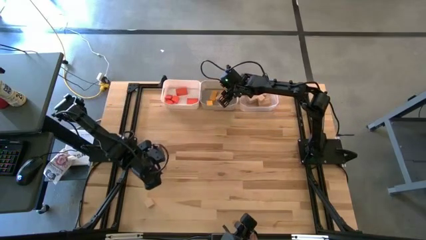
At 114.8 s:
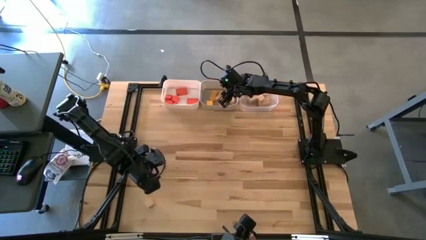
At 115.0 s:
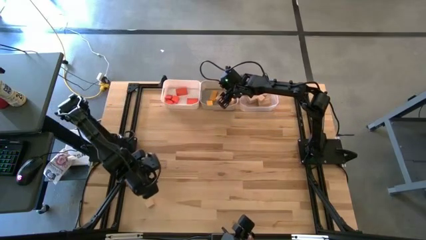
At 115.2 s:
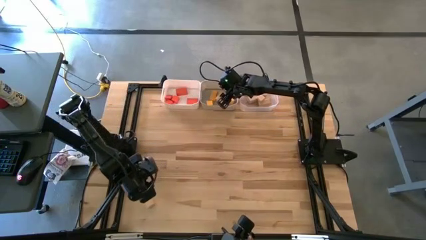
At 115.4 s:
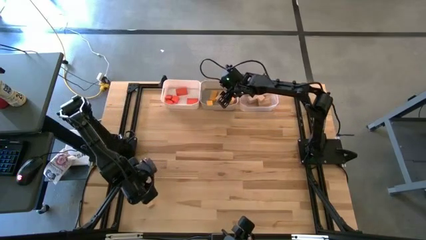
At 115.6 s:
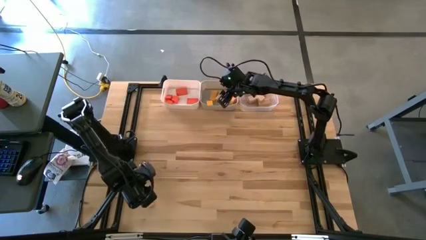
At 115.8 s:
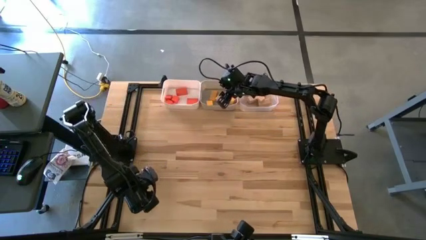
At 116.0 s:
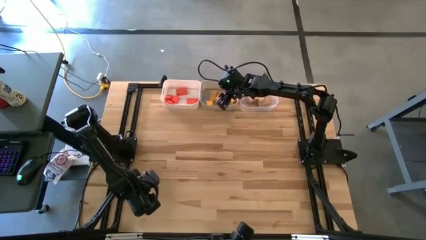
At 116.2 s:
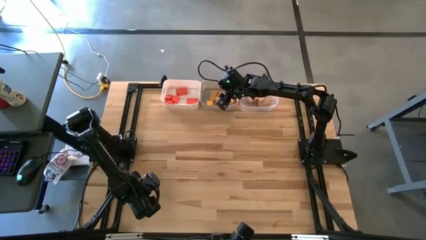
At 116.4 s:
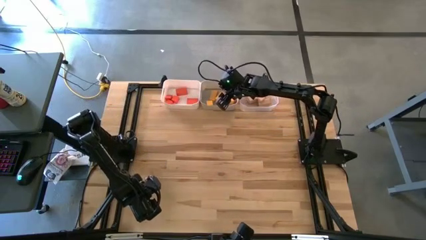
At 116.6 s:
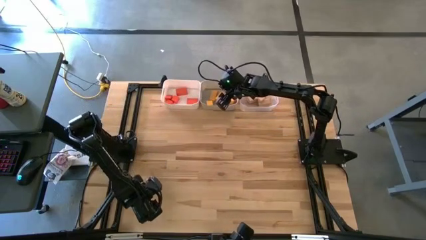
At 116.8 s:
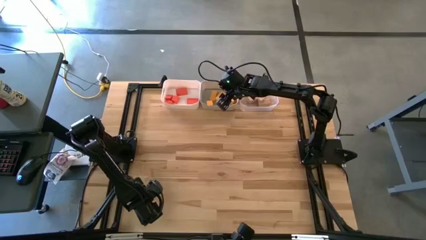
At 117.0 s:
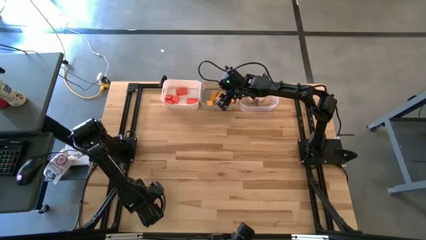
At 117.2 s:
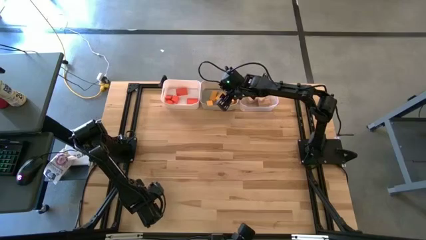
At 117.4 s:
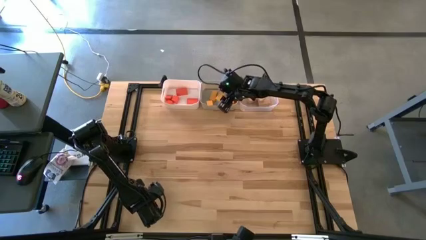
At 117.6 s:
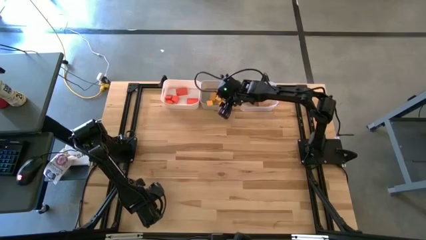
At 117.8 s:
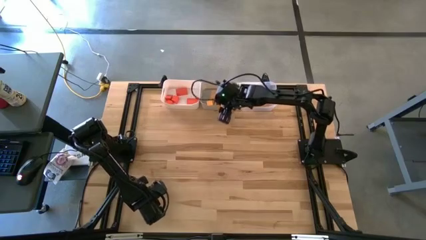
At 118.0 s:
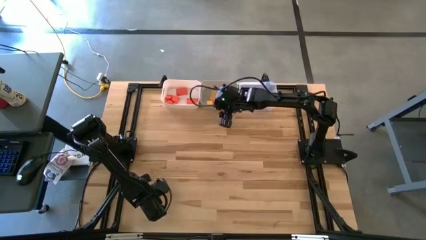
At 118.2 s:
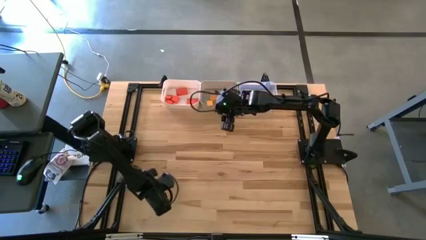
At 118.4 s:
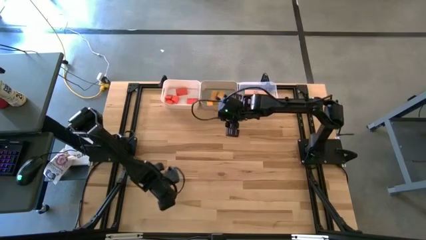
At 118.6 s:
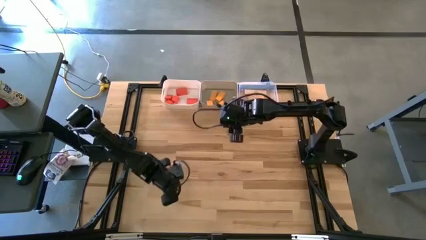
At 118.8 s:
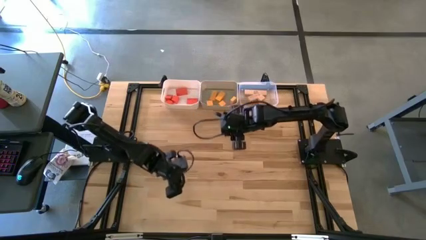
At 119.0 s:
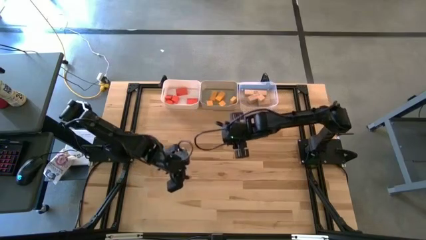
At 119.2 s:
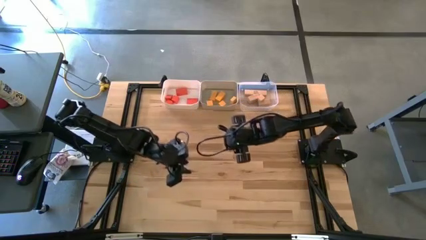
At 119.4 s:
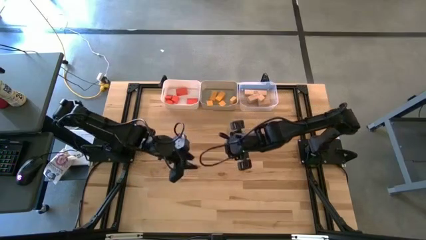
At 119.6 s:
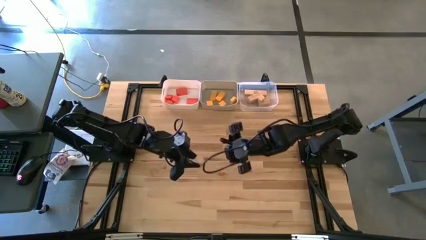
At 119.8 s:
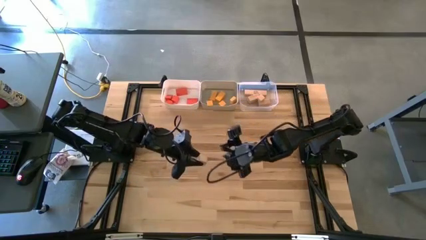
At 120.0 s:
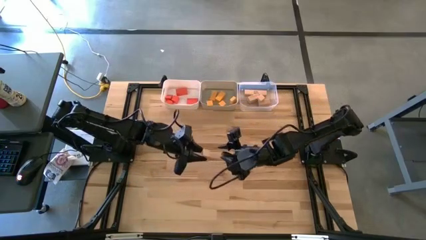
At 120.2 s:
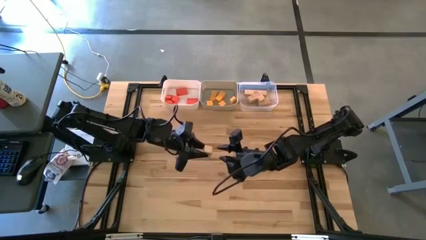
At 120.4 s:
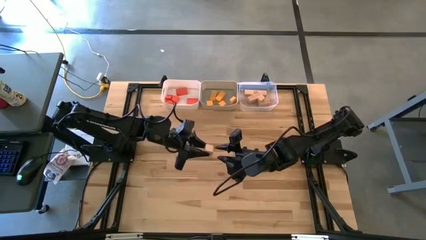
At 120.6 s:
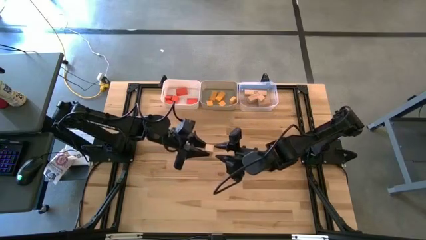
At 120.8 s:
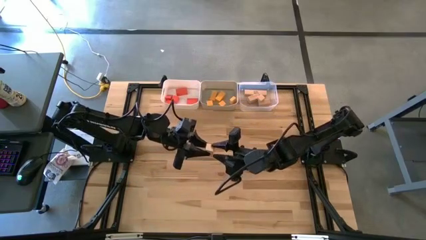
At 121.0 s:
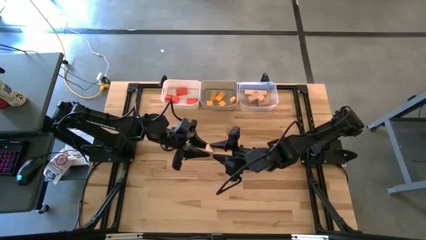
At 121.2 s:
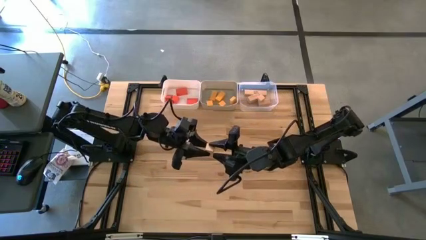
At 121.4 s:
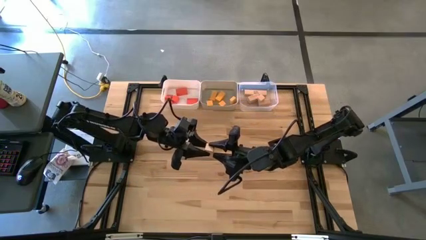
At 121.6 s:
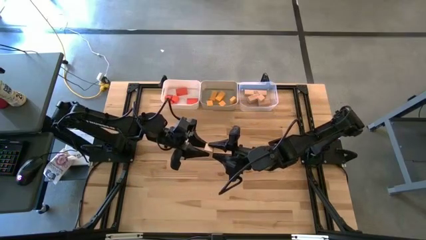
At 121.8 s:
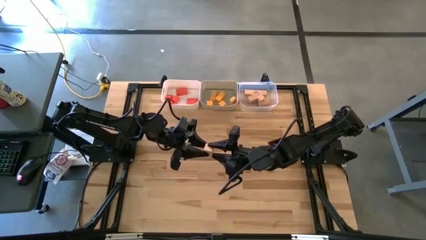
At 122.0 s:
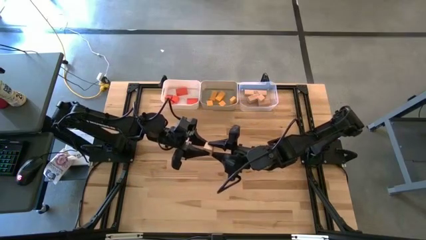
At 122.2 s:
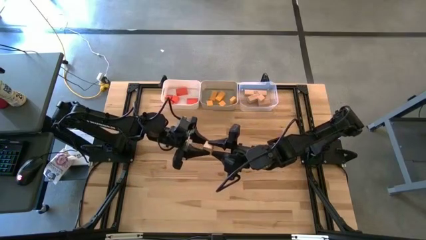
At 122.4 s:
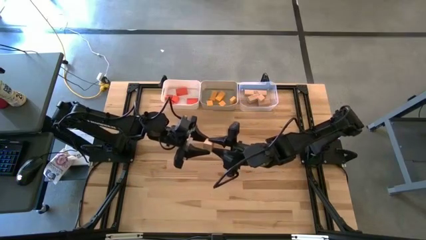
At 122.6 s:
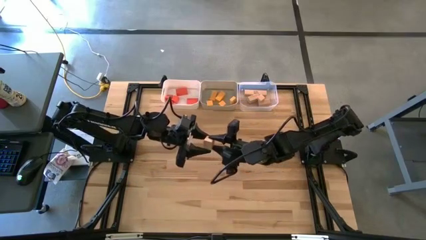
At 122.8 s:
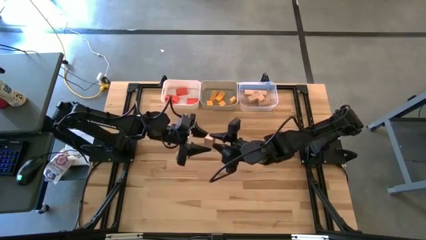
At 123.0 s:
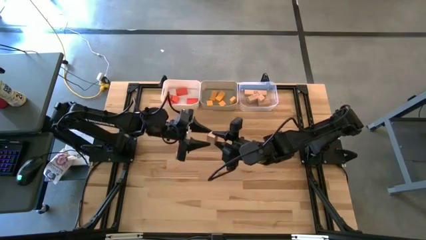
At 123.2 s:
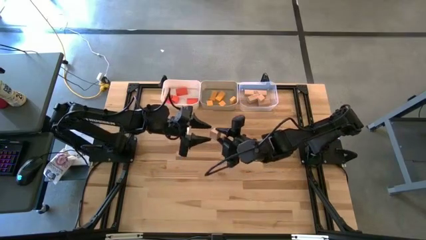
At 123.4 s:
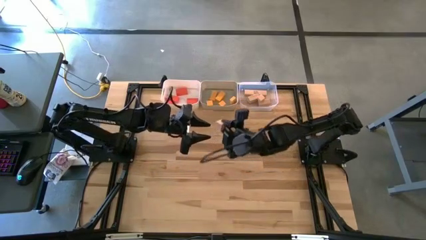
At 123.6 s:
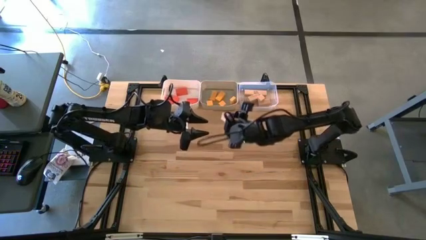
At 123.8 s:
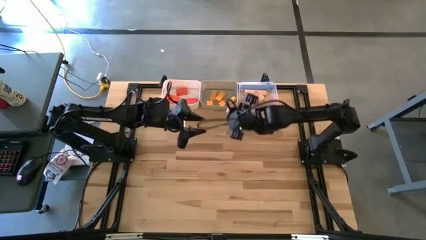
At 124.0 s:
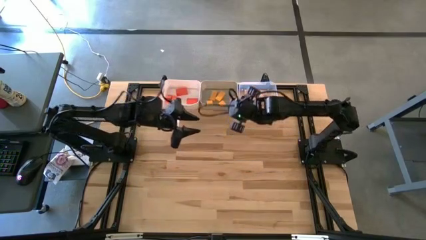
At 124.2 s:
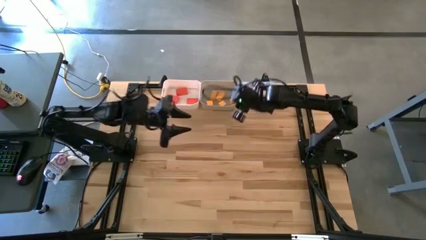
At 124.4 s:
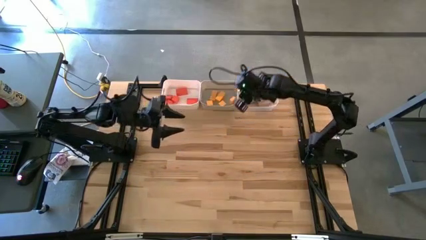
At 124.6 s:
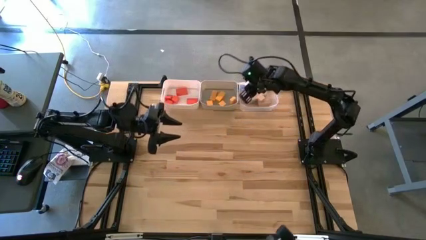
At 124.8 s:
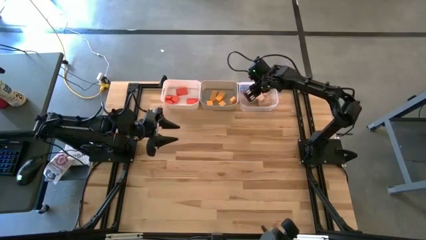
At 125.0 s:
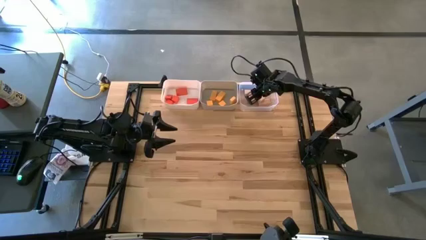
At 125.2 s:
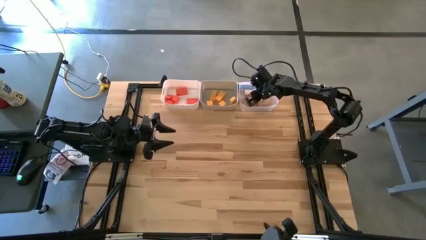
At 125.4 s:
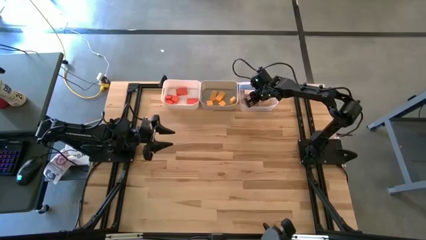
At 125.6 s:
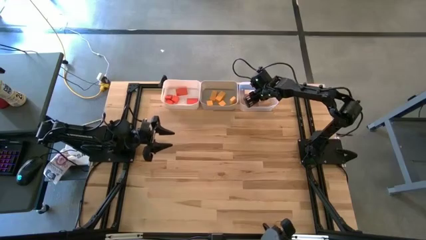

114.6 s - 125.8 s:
Task: Sort & place blocks by color
Put the brown block into the transparent bin

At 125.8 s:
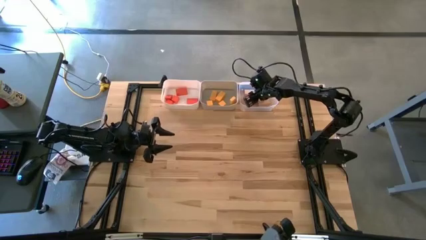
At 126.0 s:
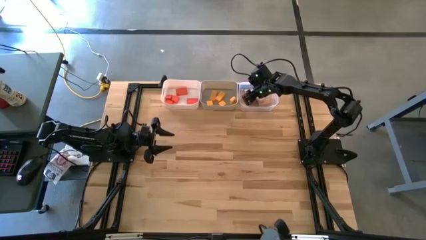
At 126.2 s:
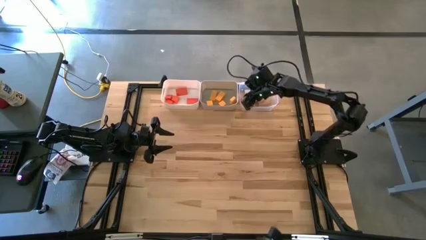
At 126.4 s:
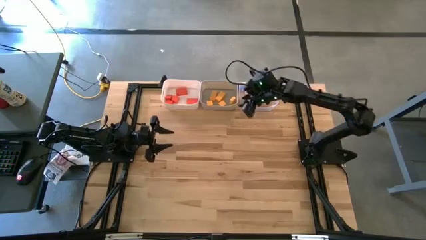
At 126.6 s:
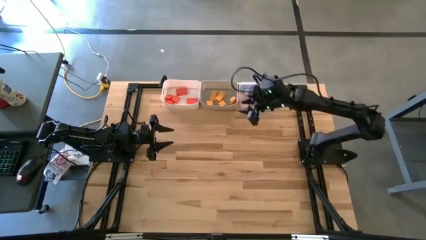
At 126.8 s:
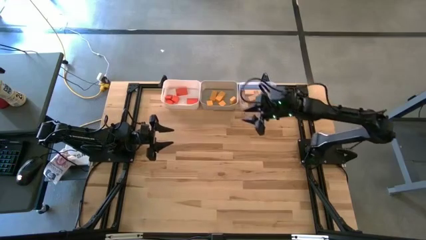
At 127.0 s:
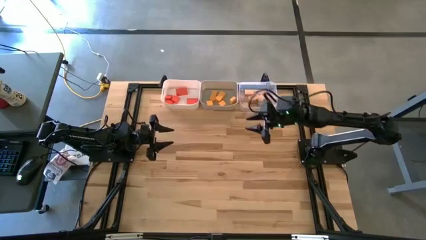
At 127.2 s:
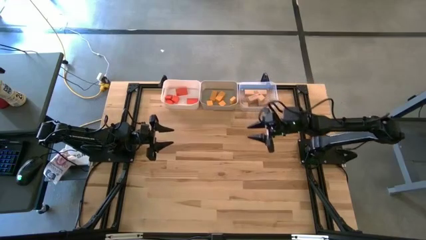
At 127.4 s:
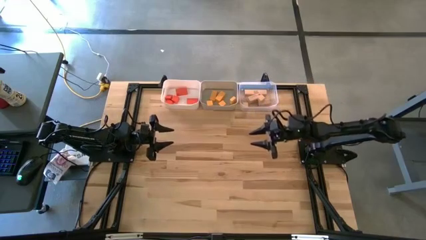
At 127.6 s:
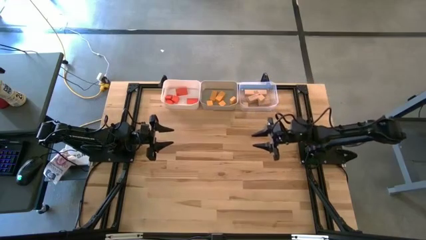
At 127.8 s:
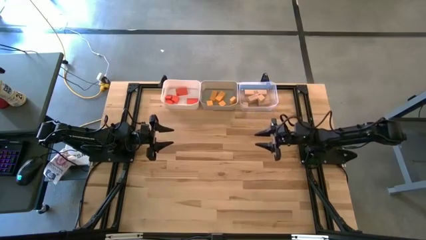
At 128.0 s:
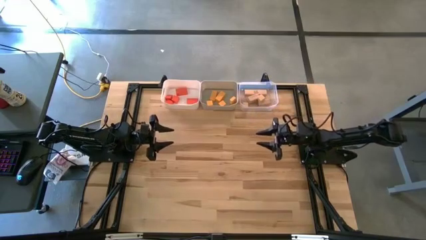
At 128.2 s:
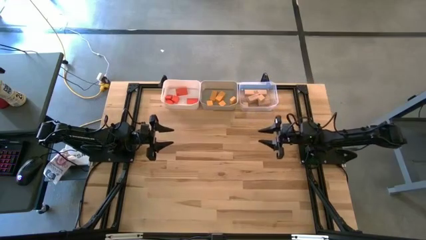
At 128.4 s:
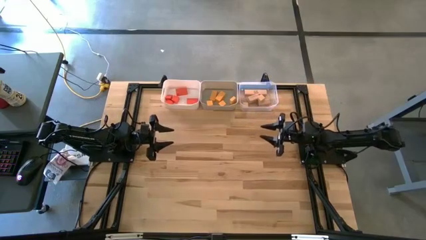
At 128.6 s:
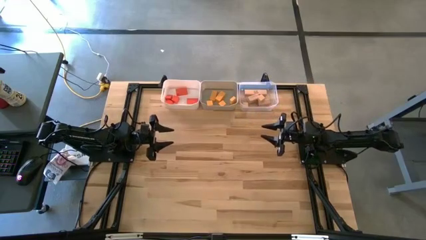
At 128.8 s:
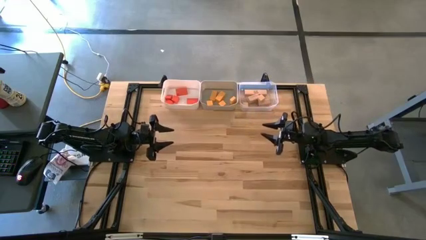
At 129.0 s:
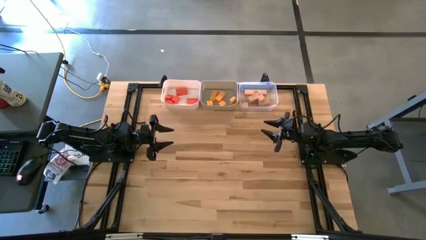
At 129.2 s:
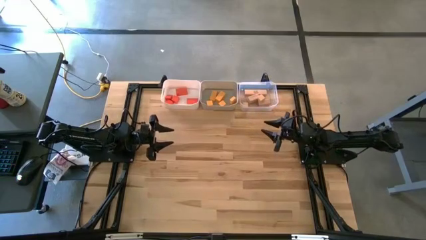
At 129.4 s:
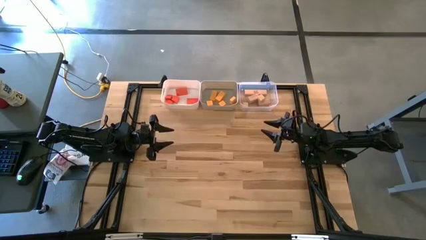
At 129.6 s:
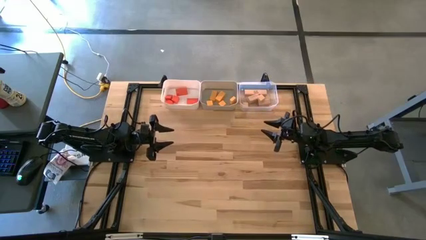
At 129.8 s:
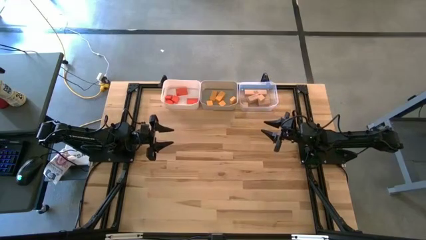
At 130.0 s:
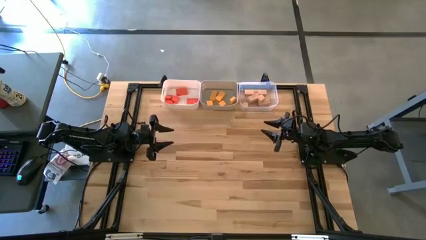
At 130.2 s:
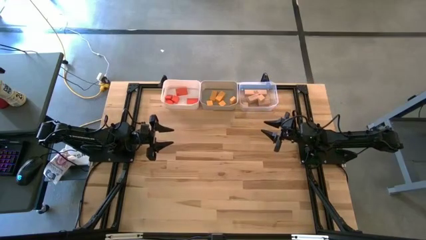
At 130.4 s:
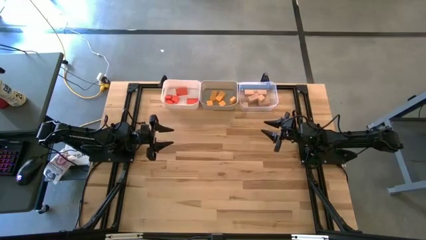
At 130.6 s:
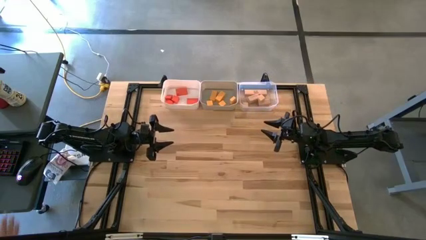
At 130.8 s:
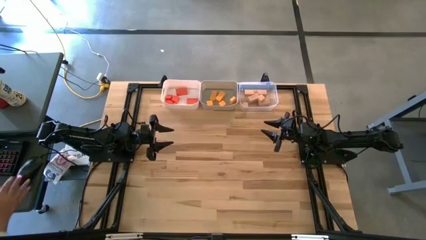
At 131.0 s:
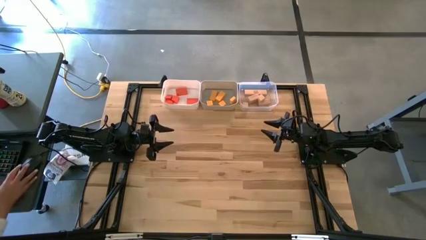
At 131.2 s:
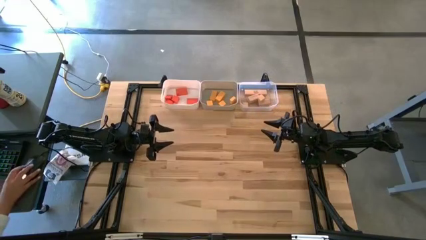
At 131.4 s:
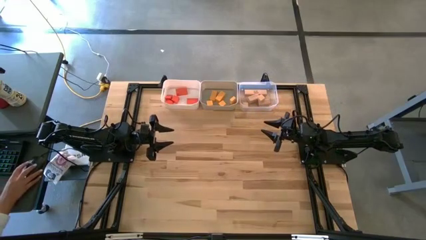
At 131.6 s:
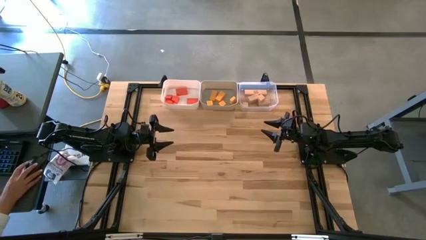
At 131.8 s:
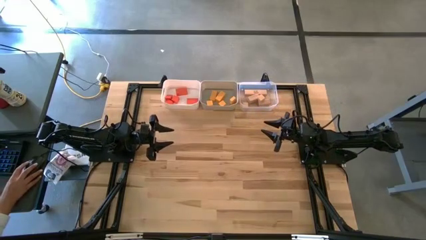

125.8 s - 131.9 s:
Return to Home Position
